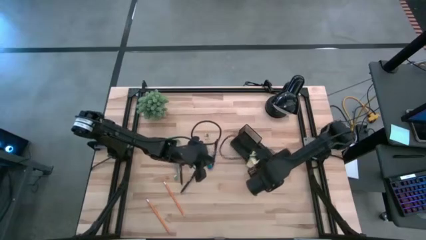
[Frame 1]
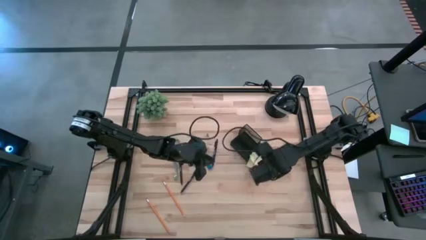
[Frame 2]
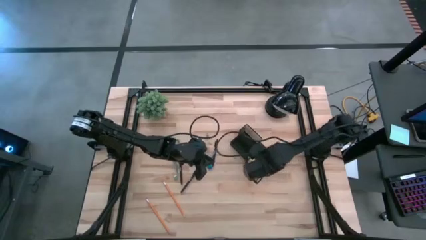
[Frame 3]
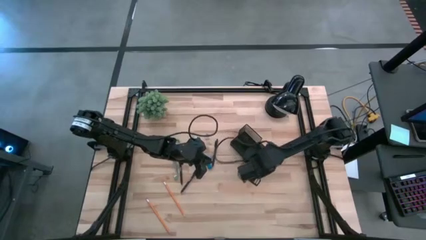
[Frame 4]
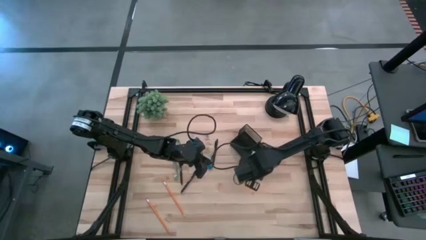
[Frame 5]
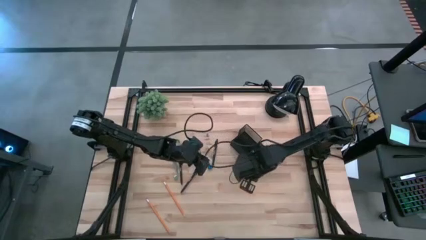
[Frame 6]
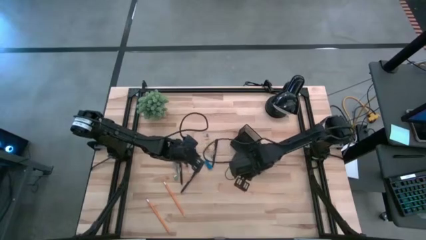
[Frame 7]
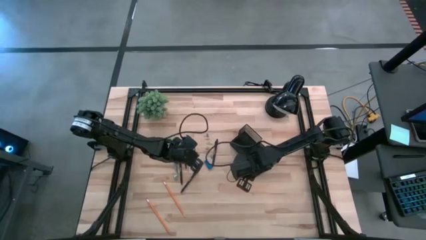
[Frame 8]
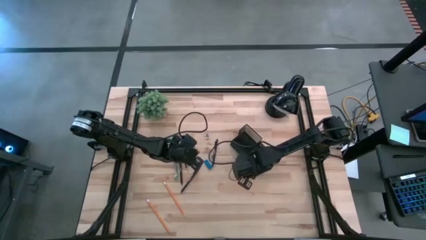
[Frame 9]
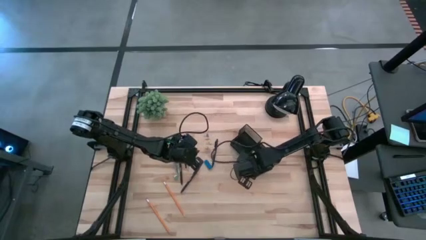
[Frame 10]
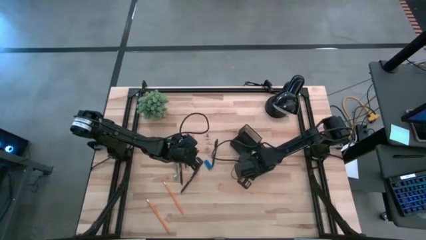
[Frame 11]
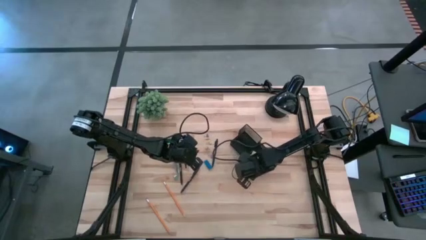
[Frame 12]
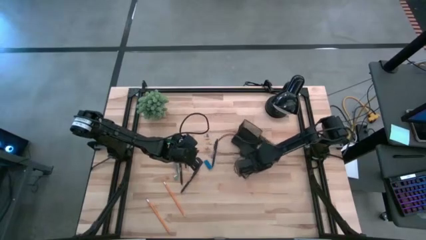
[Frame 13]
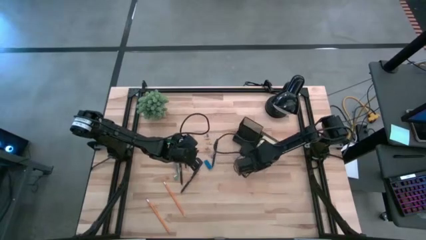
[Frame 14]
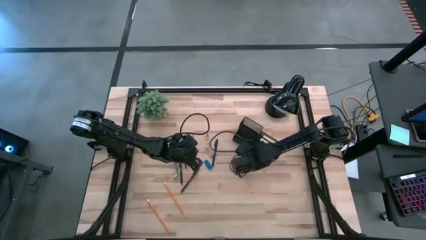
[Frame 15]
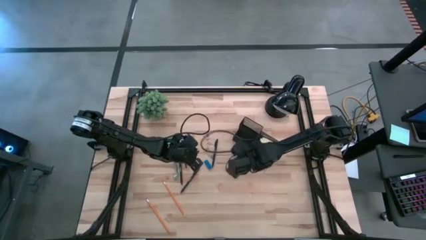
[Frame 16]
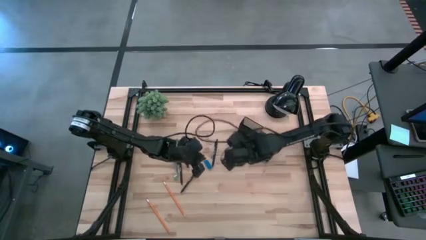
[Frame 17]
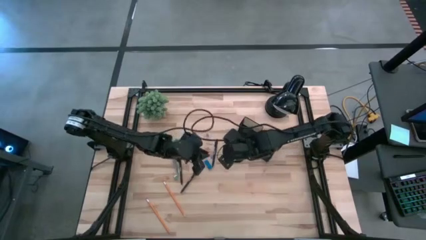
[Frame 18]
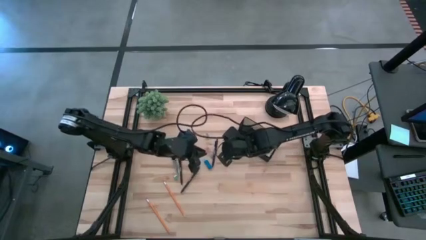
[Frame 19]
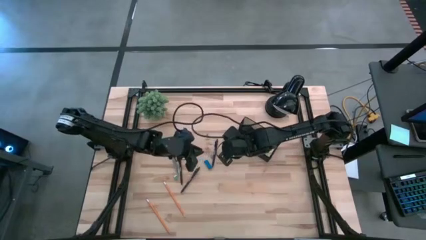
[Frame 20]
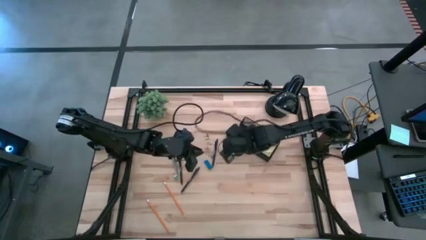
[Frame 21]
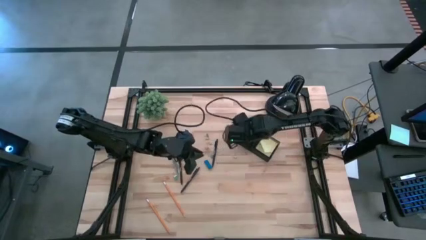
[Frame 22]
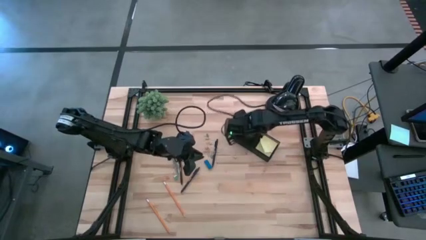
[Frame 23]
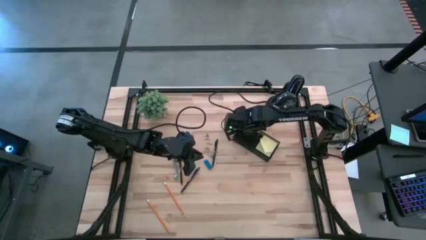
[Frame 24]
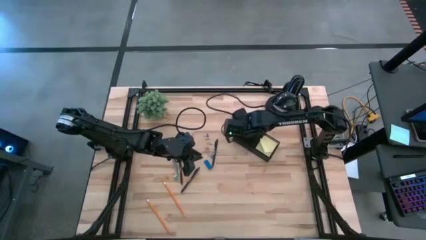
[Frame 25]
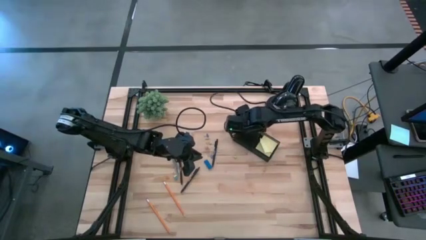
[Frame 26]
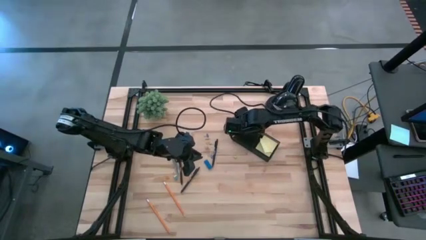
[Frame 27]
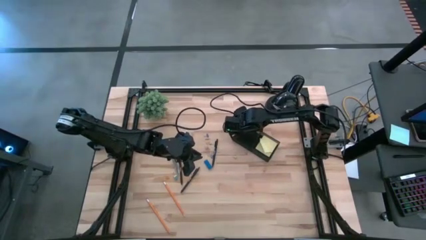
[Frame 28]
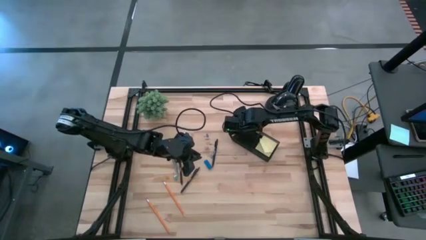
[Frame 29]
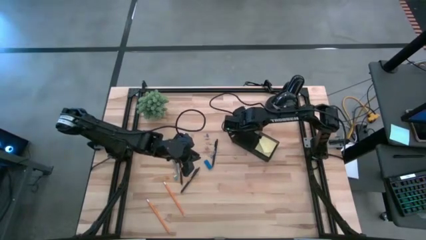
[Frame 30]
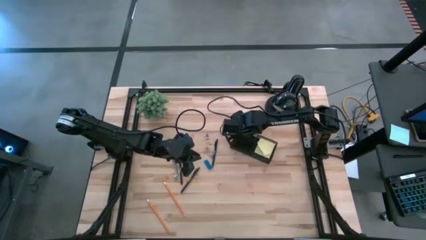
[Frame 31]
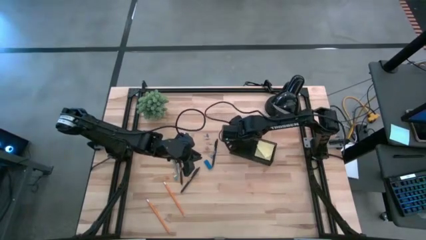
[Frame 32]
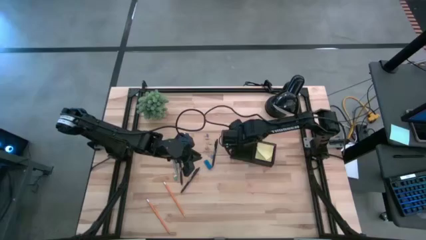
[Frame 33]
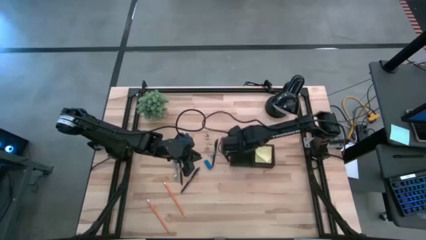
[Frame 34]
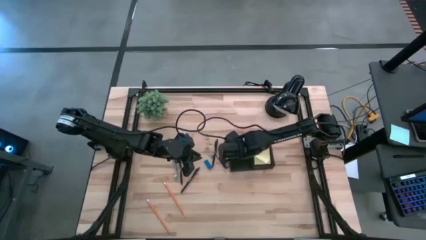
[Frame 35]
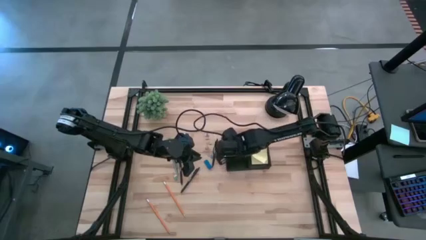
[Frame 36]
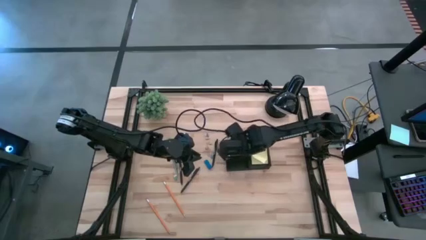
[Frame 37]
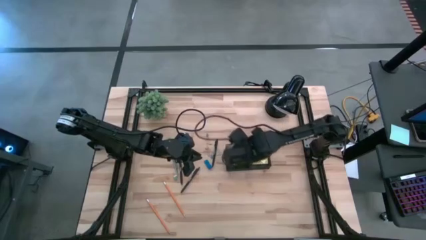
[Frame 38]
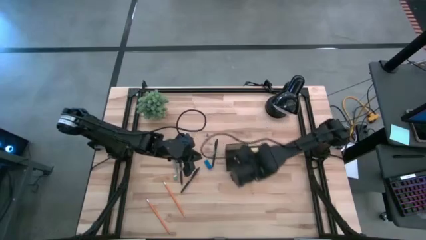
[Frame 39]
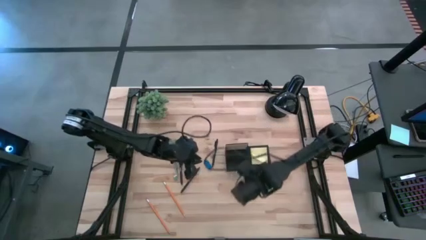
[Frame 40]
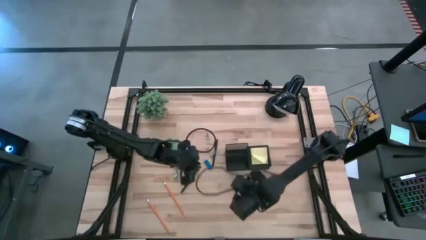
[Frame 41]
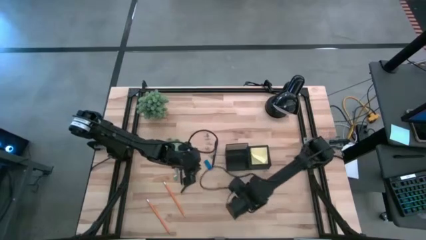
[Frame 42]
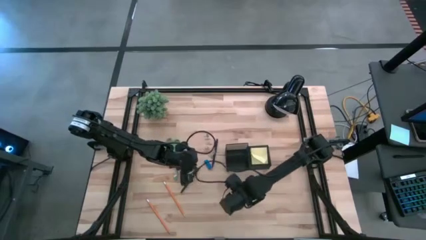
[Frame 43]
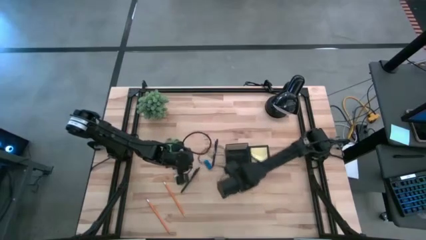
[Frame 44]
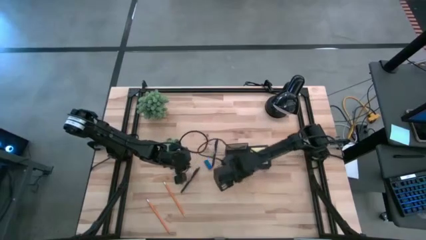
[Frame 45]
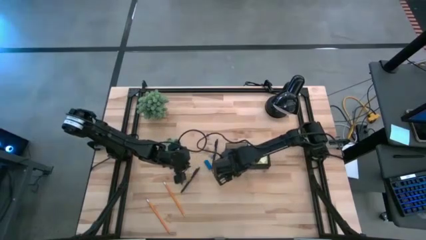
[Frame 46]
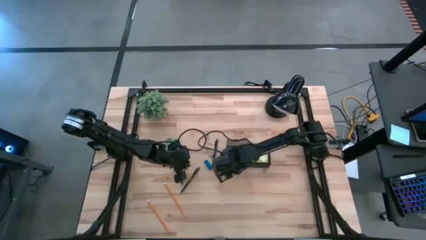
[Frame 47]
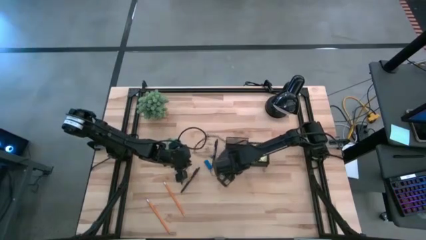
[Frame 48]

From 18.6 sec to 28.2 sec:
Task: Pick and place office supplies into organizer
Adjust the black mesh organizer

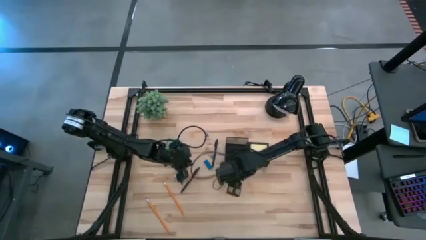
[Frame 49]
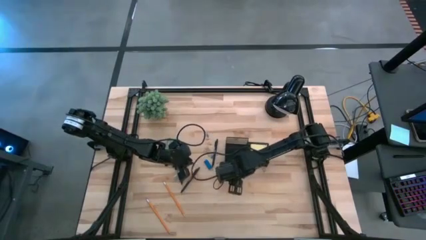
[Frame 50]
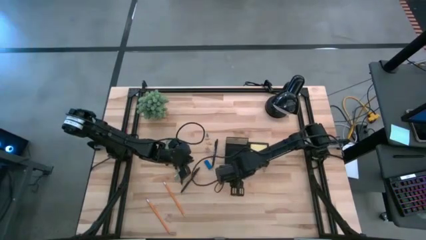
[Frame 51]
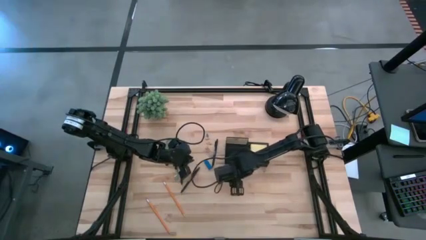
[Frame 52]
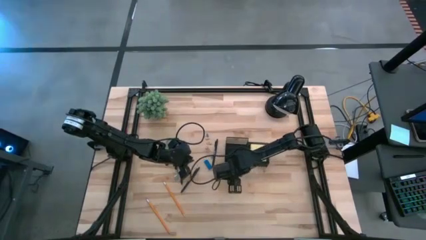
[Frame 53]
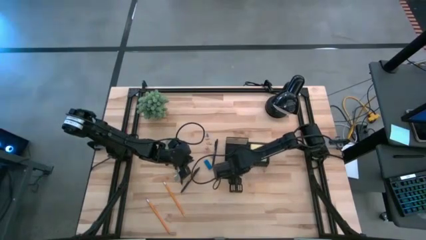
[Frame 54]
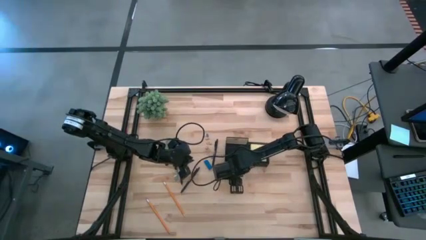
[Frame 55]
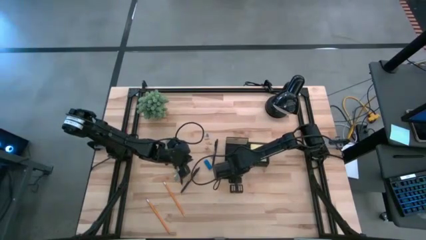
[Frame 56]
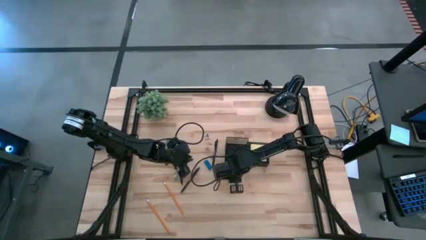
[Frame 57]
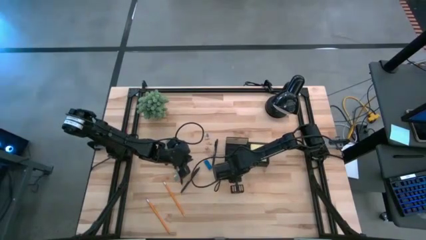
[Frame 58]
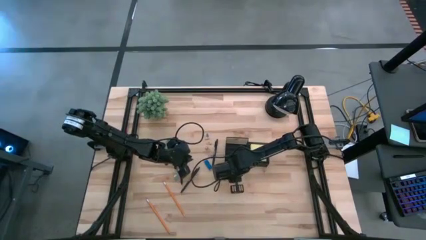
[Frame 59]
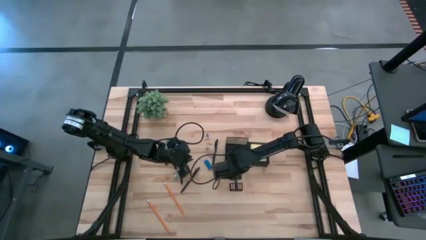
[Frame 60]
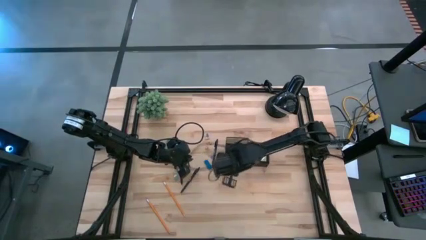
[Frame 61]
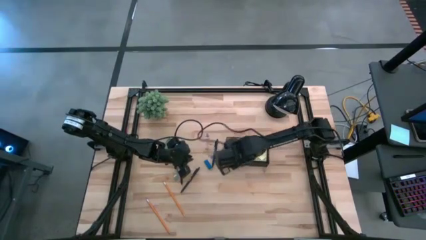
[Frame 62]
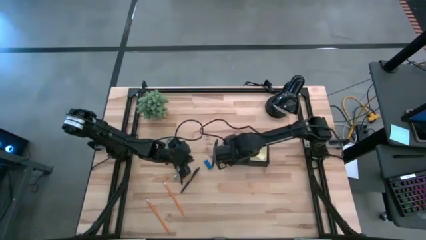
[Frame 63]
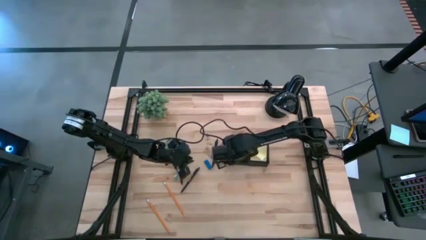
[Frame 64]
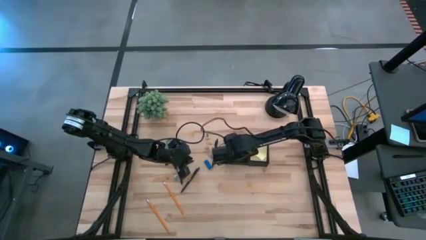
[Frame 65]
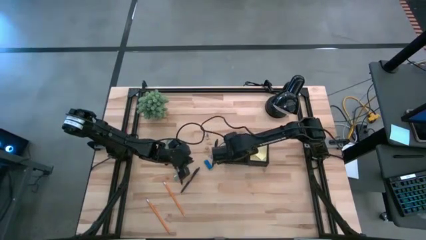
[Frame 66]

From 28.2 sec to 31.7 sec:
Put the bottom yellow binder clip into the black mesh organizer

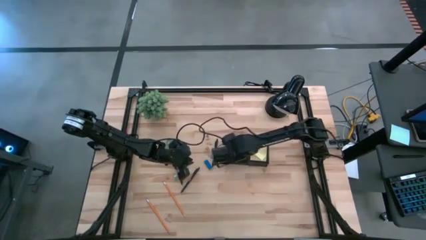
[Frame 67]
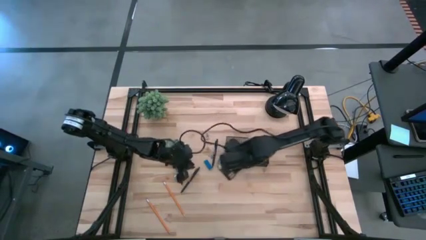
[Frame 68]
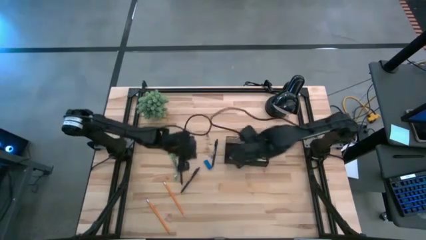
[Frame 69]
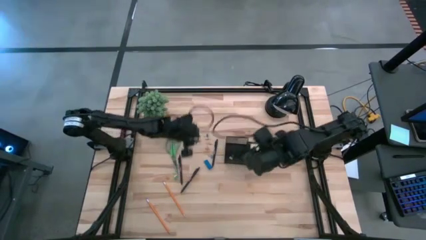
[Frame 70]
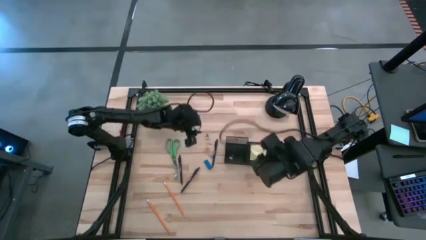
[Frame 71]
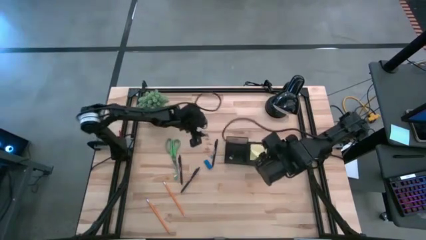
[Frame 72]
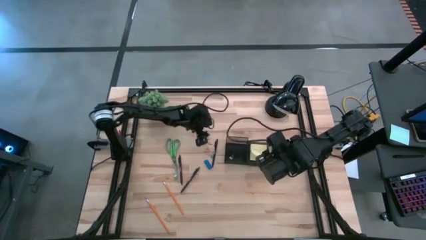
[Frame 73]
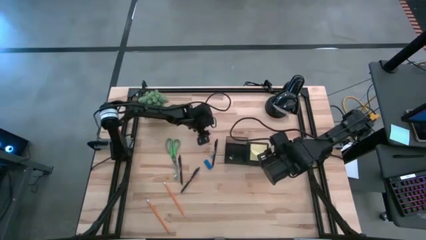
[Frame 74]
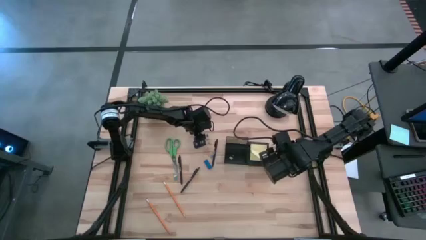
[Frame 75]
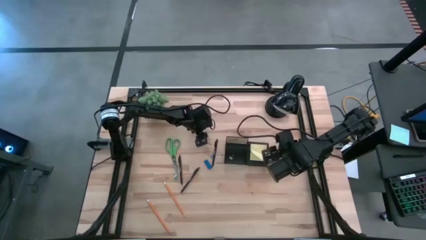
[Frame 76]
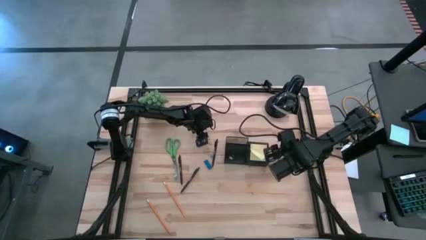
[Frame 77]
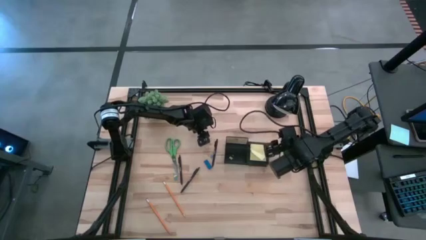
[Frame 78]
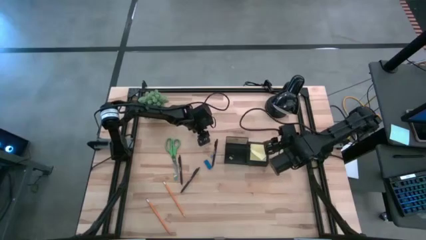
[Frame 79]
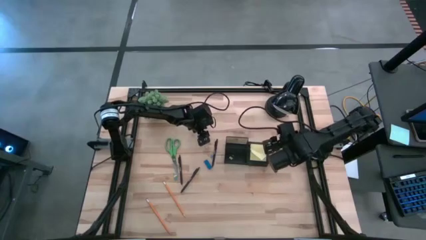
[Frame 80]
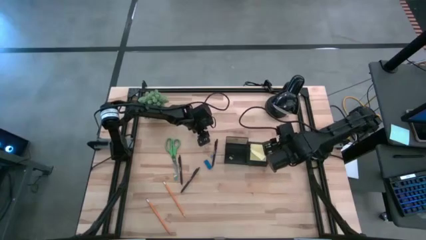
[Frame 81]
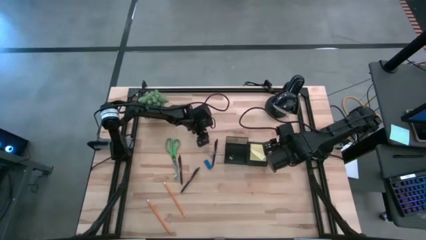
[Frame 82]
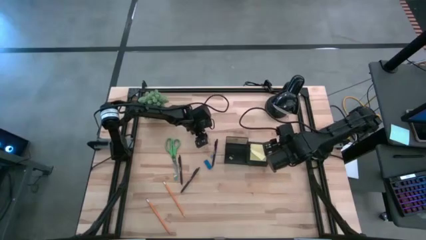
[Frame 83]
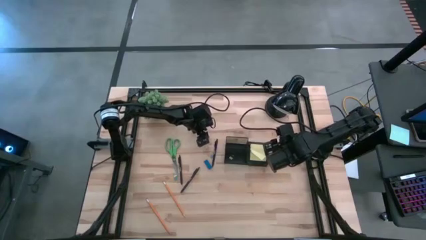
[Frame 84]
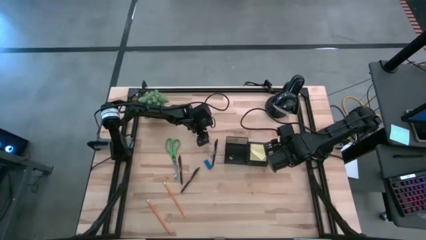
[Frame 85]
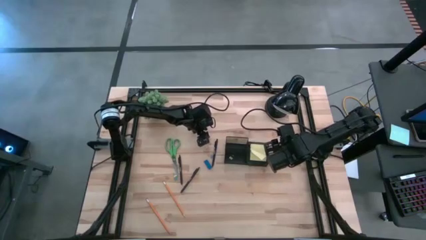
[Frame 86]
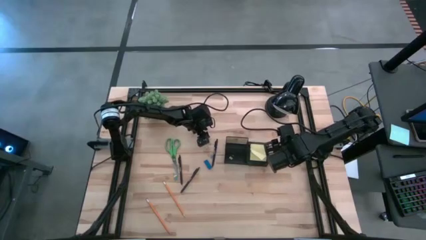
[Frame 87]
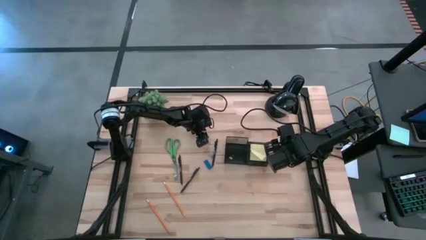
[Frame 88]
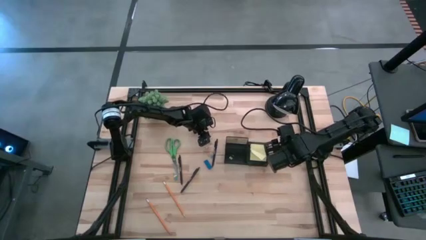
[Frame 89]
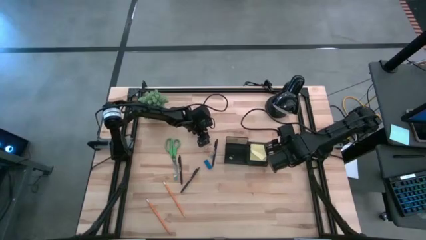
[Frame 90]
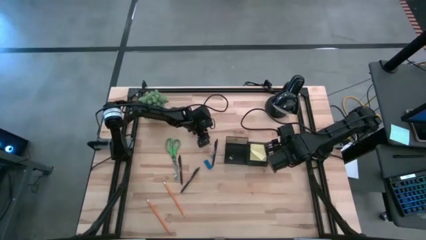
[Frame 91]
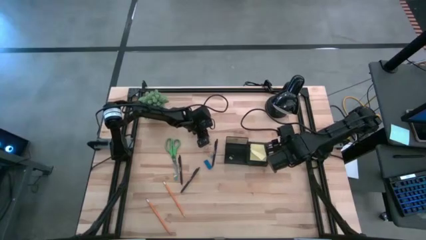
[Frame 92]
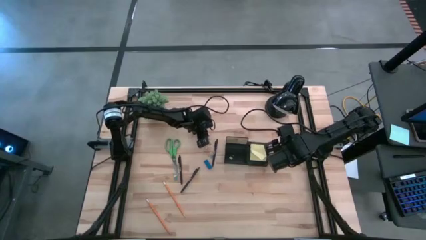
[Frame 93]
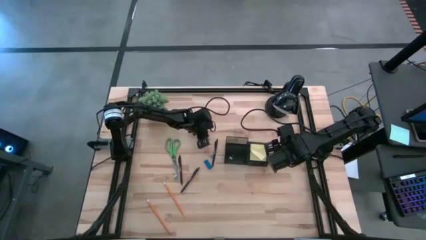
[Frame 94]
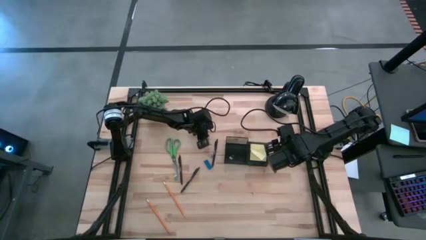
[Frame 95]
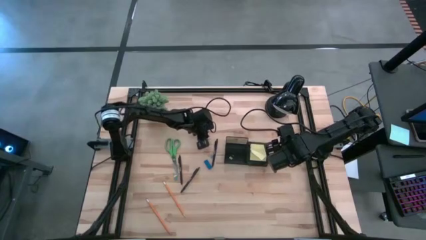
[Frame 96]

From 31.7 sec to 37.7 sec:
Put the top blue binder clip into the black mesh organizer
